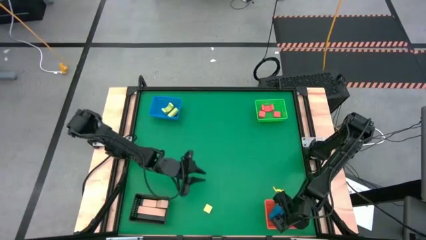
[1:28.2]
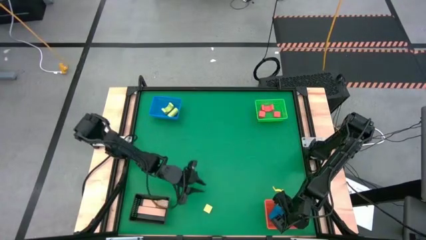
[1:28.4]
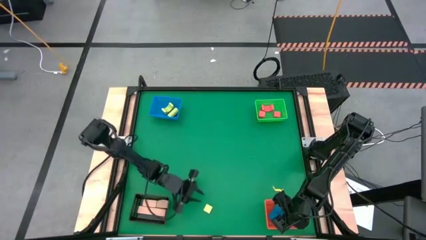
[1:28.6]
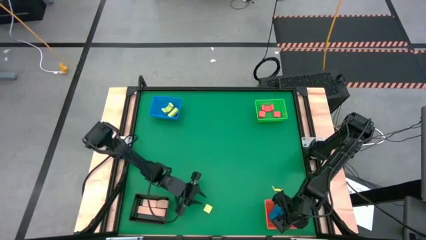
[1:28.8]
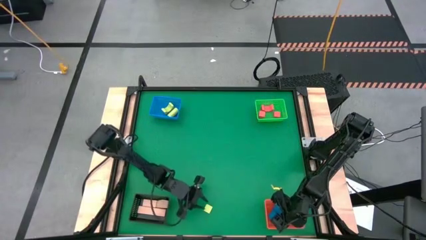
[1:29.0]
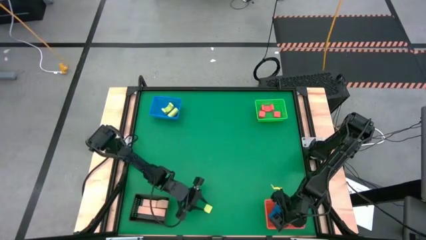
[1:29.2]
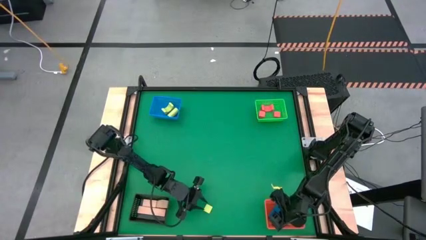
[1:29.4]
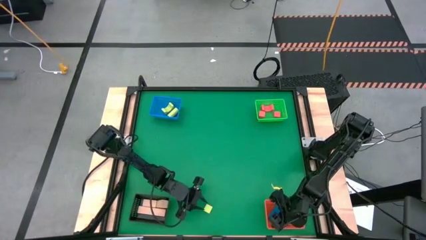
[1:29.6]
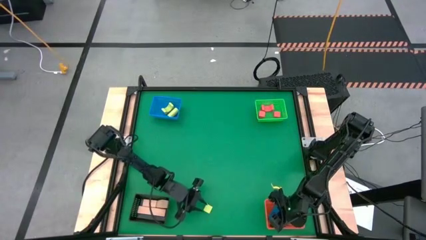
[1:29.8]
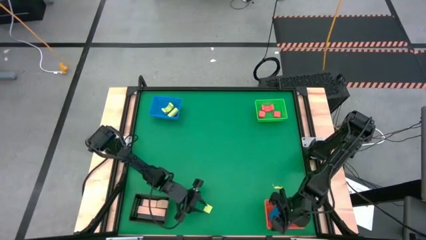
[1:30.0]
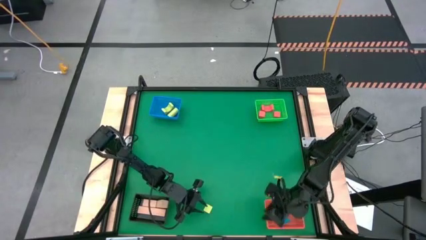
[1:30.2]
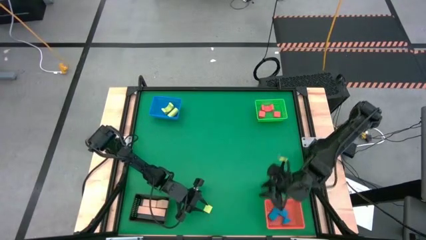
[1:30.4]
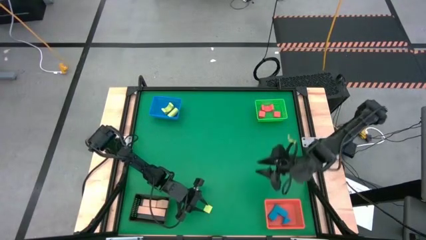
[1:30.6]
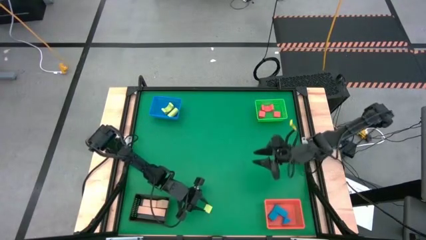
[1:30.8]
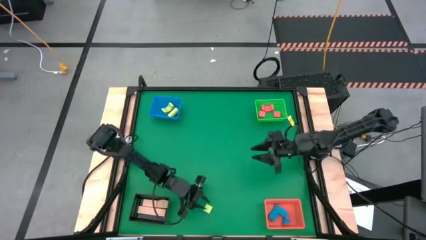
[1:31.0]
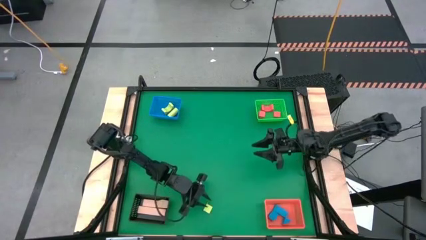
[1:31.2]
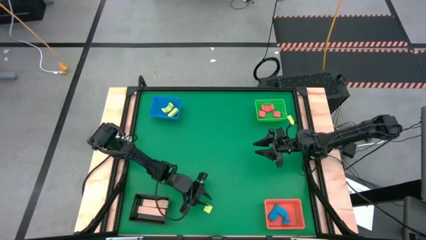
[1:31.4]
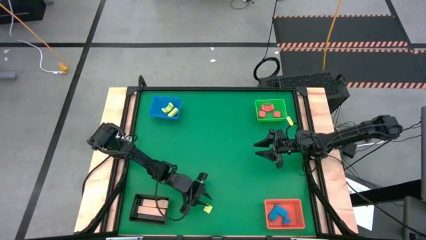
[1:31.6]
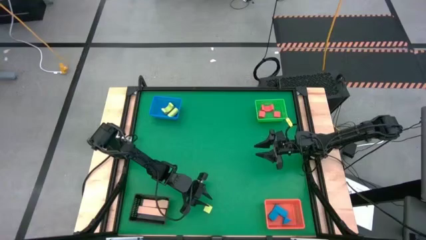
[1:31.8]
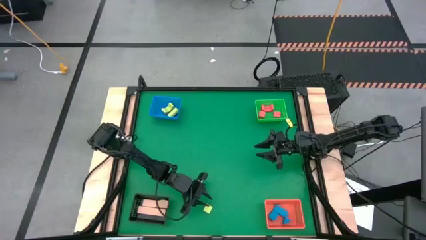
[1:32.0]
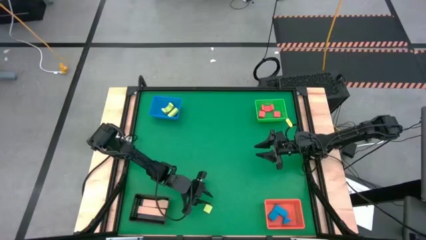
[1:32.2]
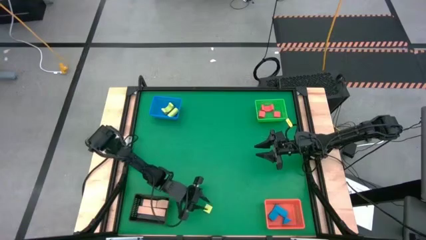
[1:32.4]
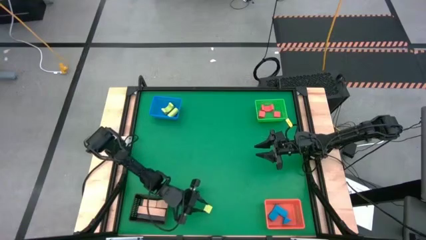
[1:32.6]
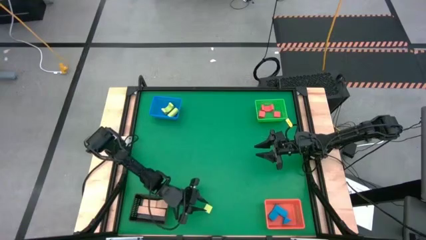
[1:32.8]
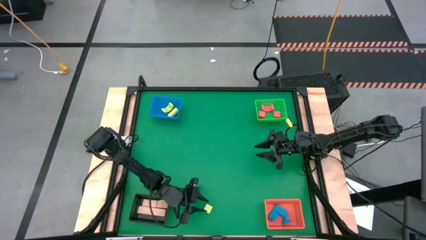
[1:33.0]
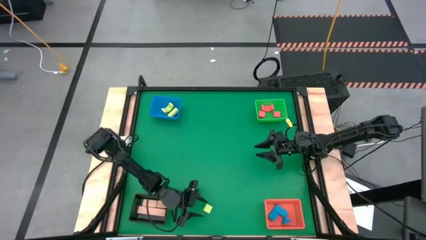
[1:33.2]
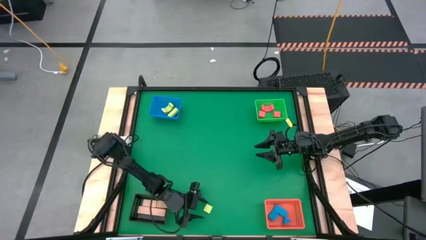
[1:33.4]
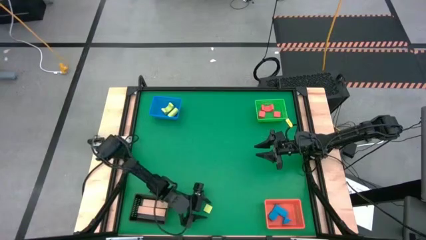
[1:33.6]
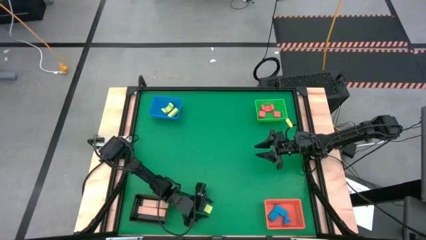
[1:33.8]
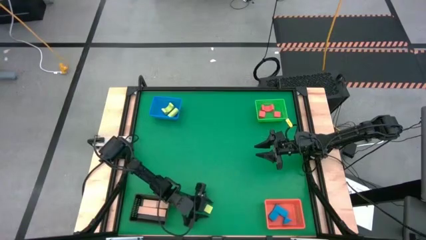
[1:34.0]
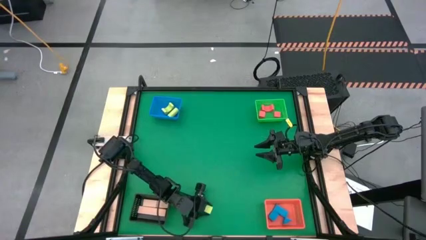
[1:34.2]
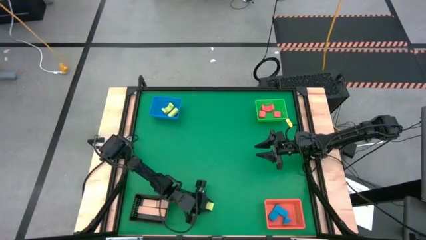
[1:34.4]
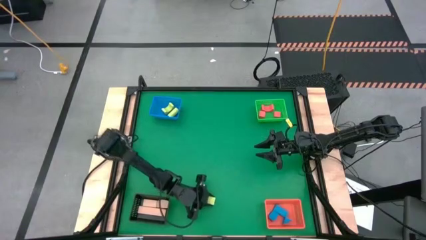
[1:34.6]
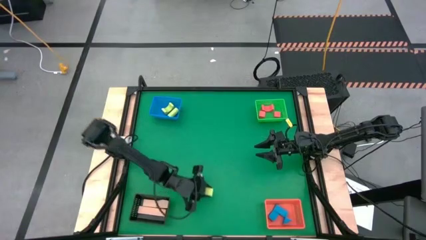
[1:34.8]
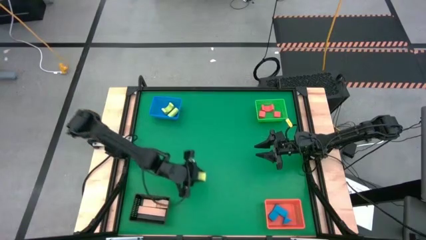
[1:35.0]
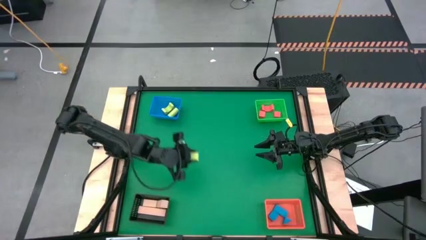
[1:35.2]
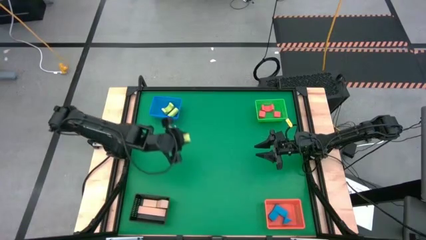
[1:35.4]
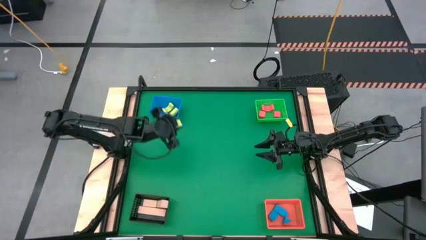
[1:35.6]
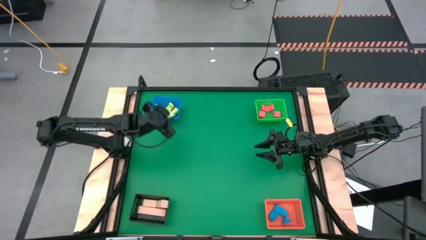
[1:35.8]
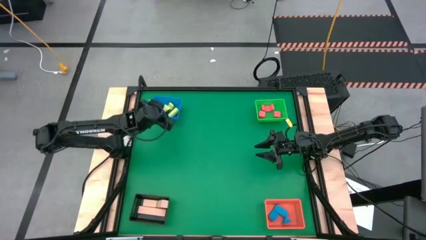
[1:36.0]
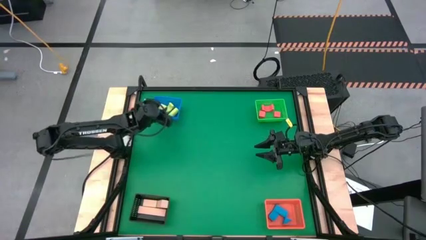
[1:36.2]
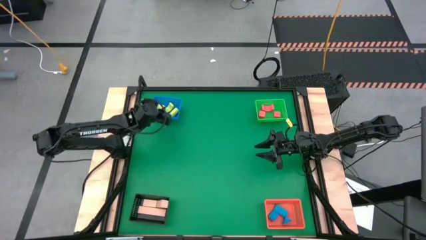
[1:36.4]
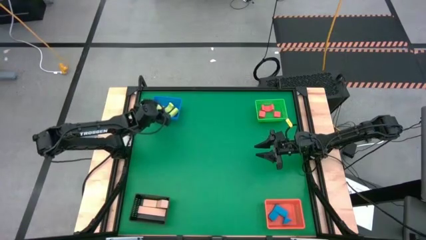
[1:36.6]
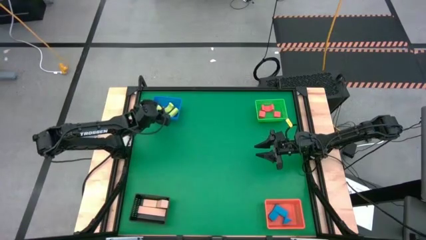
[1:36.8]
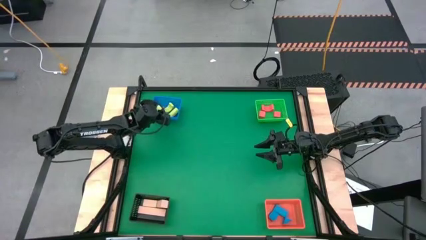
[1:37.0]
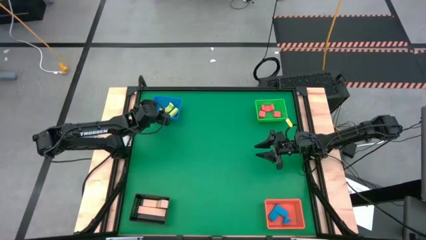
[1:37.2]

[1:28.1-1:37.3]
Task: Sort & place blocks by color
Put the green block into the blue bin

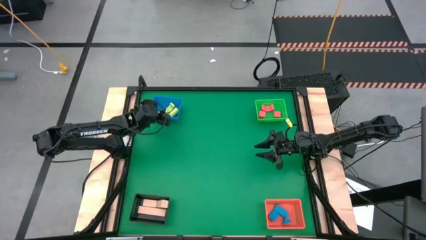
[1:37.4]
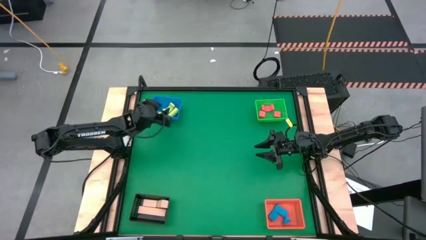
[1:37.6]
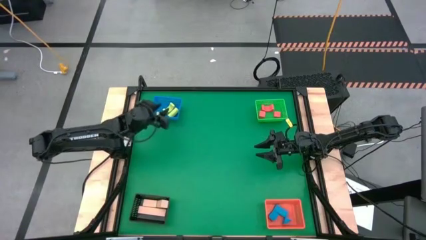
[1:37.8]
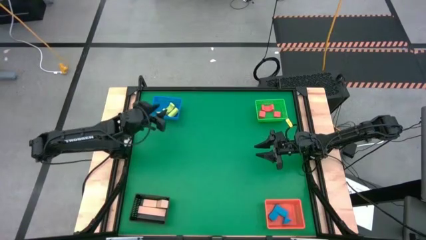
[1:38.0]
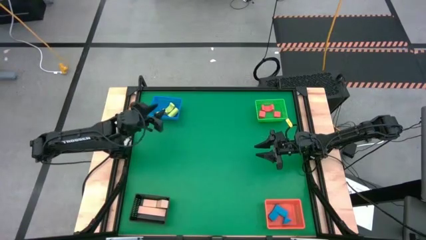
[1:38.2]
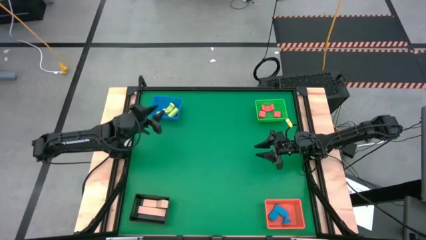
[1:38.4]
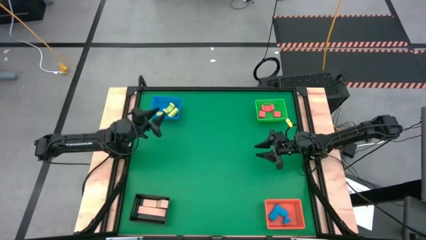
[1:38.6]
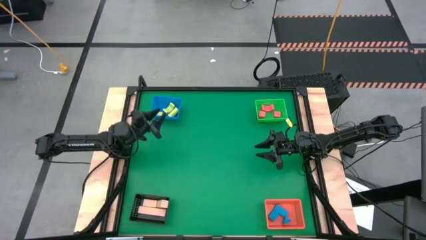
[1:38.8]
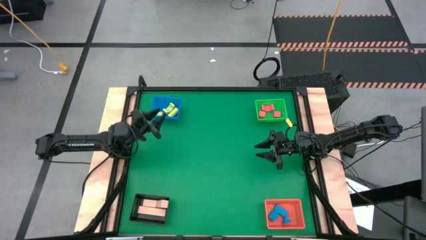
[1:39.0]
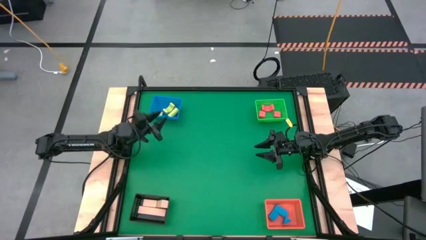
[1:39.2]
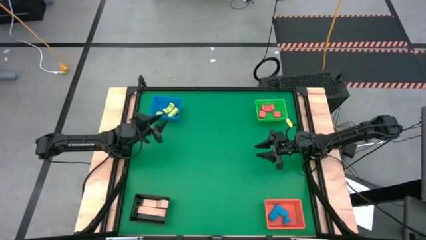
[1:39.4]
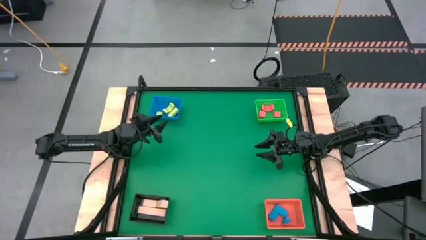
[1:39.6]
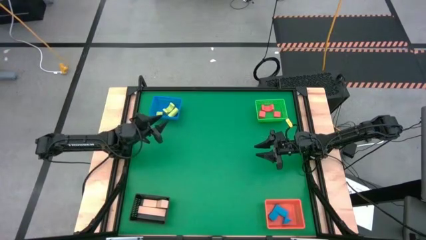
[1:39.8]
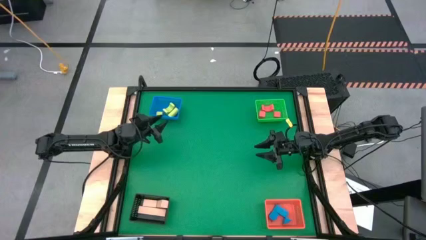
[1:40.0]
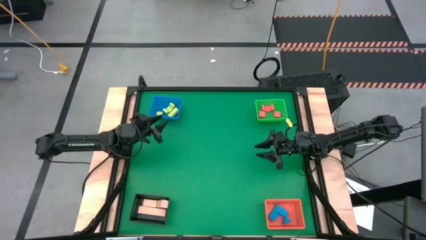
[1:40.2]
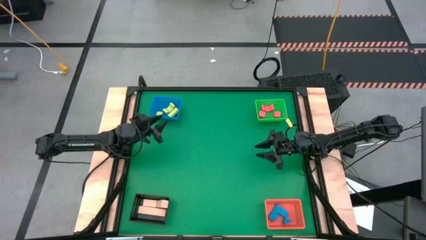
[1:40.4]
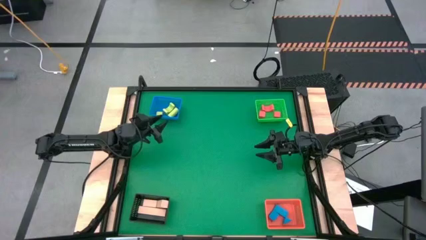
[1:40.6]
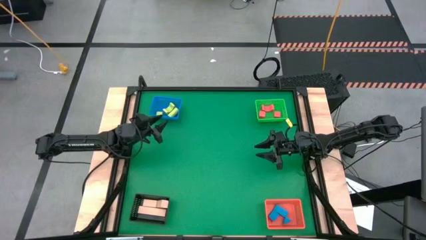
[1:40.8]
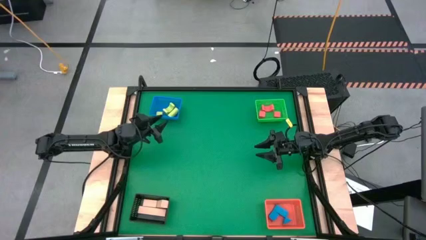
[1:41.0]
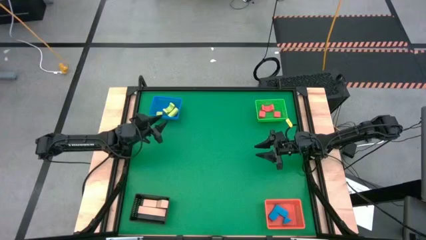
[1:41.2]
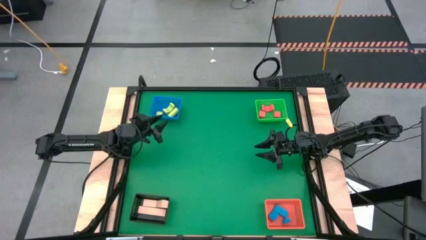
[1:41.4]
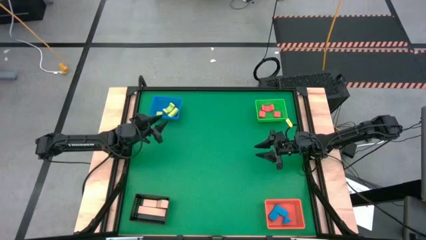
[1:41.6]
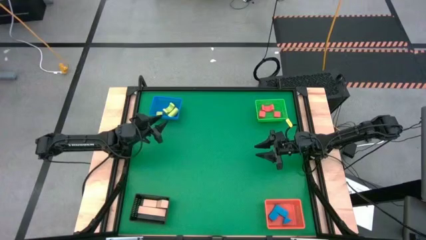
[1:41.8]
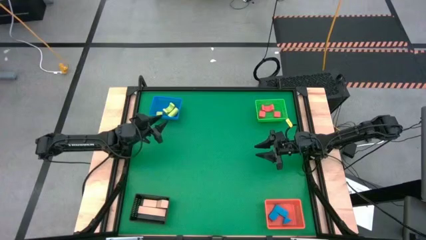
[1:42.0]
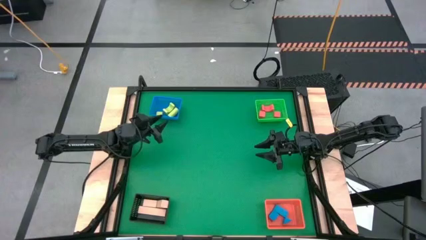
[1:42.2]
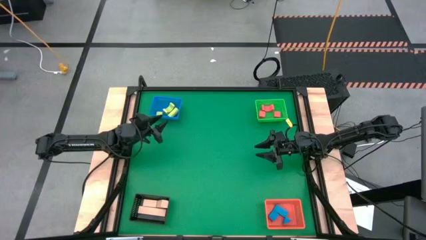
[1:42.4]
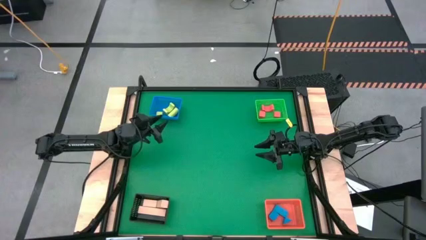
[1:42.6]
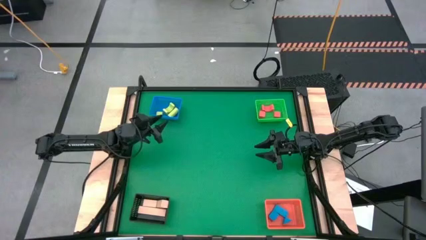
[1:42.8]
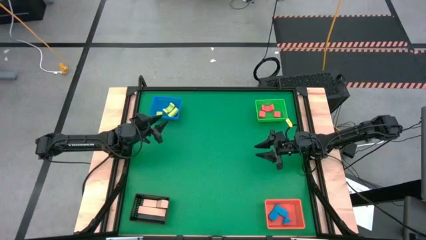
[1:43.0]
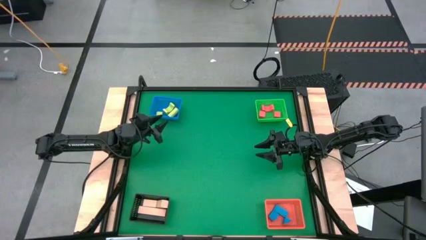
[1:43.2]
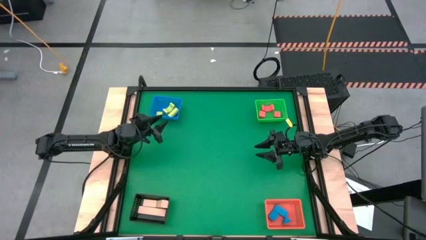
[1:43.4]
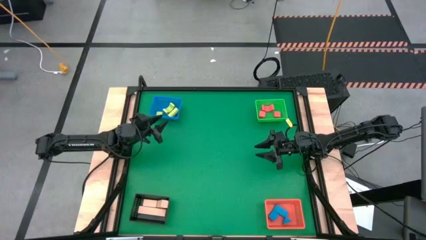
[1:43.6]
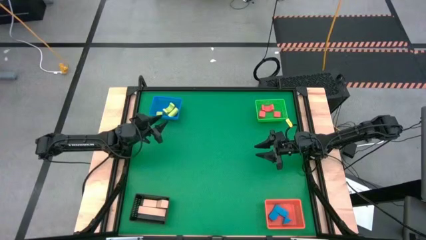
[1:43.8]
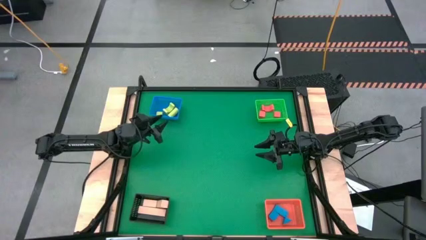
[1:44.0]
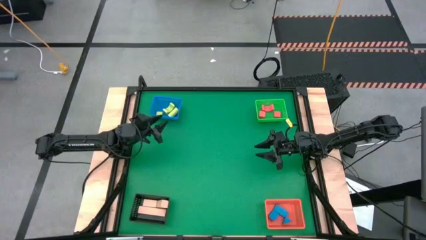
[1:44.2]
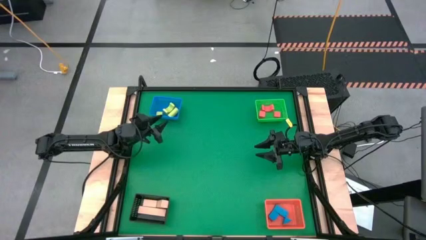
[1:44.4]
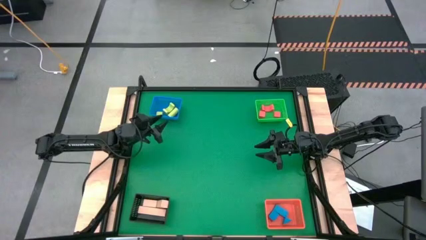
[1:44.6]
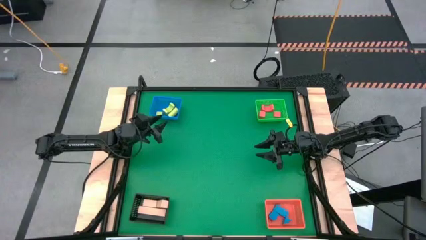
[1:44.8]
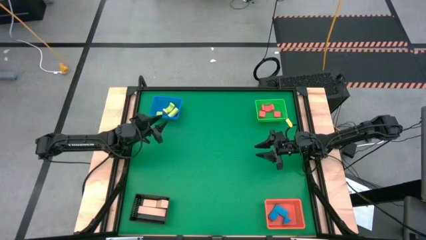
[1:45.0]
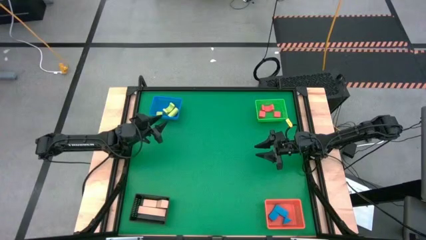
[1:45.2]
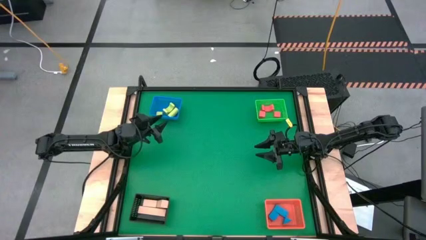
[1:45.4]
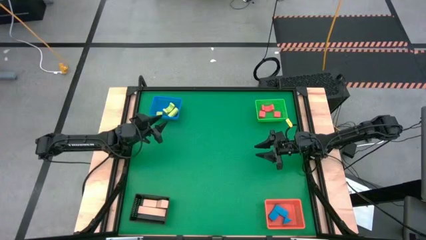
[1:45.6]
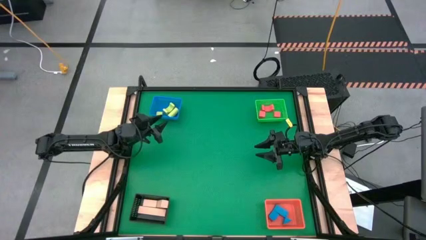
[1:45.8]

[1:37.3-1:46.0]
Return to Home Position
